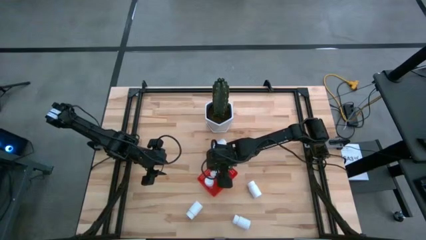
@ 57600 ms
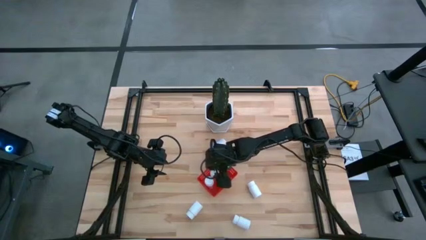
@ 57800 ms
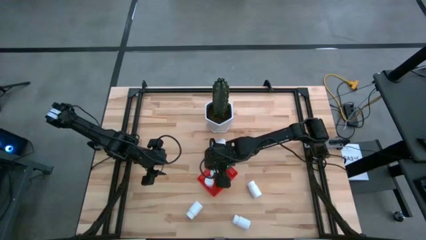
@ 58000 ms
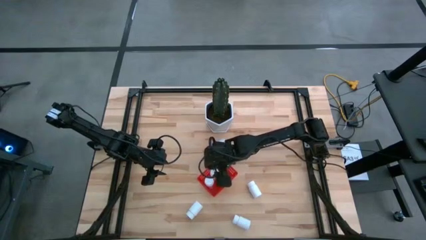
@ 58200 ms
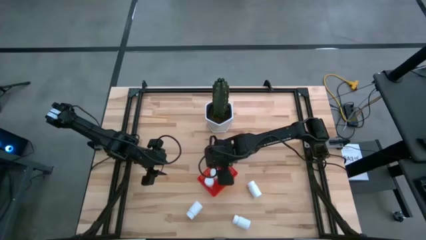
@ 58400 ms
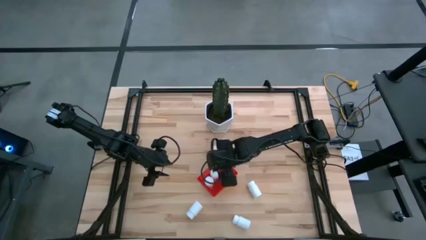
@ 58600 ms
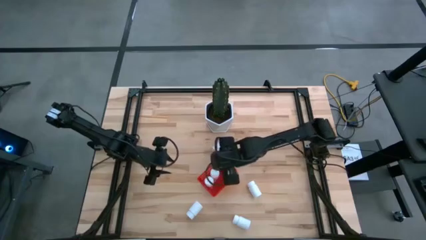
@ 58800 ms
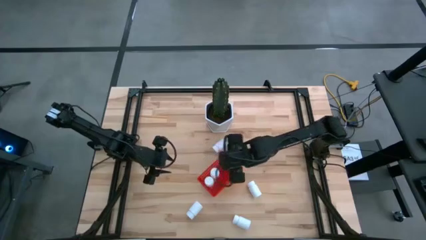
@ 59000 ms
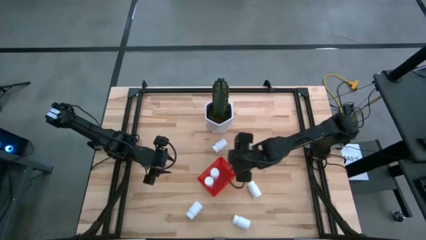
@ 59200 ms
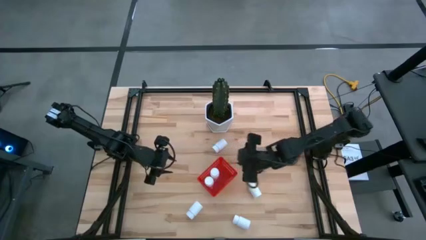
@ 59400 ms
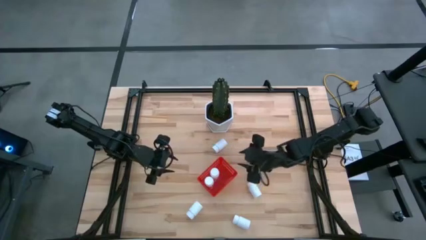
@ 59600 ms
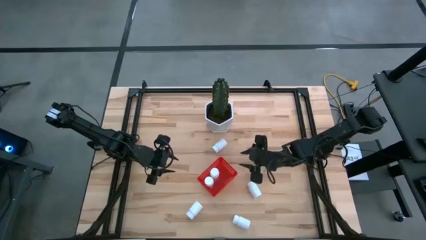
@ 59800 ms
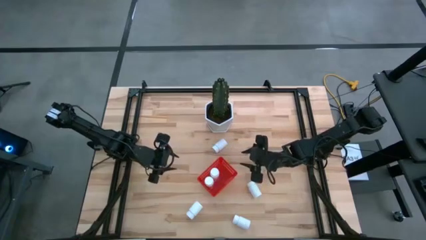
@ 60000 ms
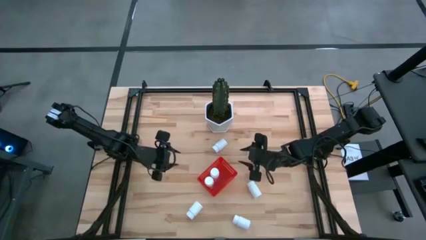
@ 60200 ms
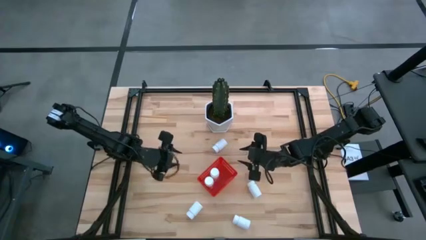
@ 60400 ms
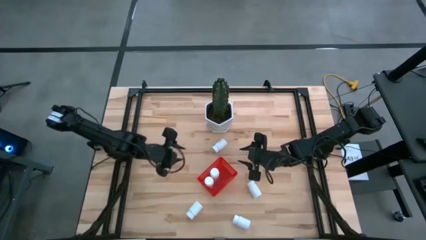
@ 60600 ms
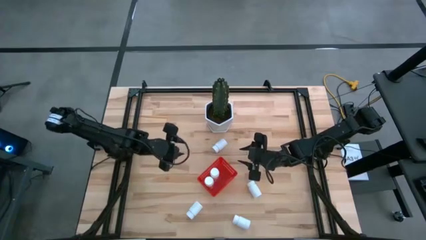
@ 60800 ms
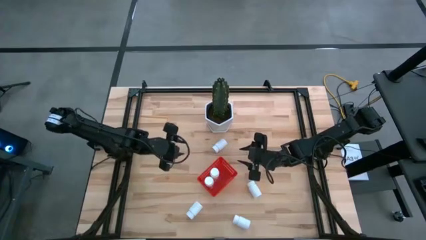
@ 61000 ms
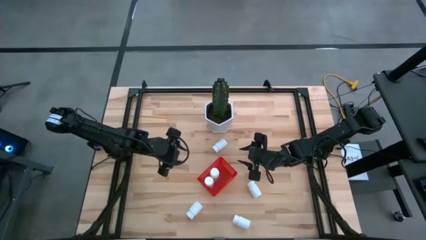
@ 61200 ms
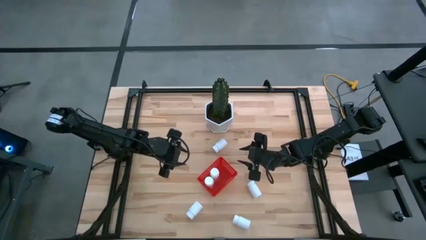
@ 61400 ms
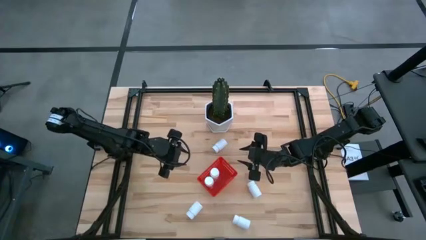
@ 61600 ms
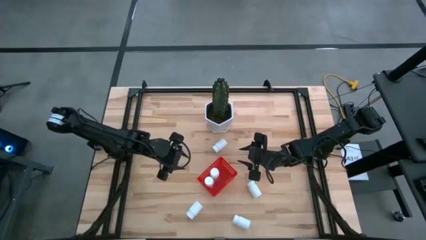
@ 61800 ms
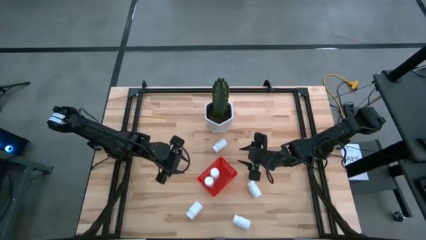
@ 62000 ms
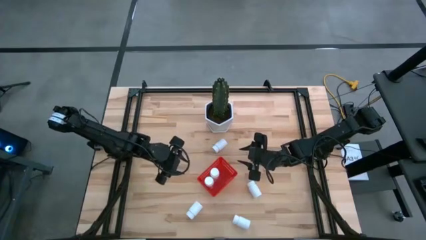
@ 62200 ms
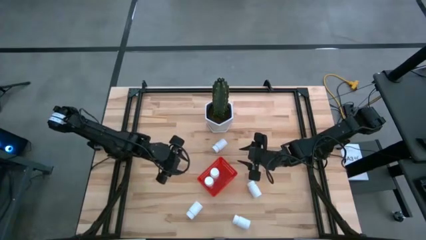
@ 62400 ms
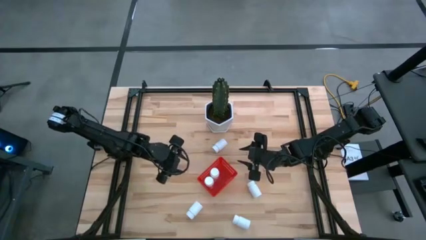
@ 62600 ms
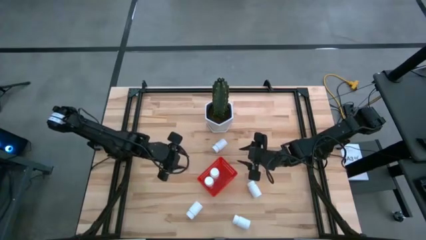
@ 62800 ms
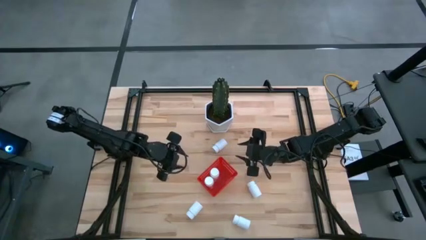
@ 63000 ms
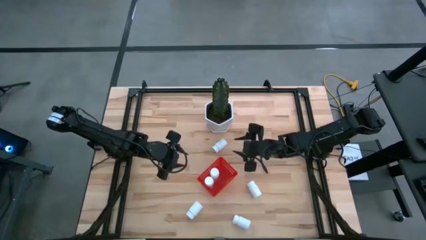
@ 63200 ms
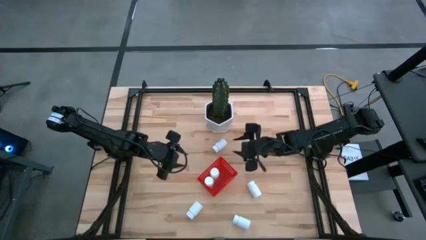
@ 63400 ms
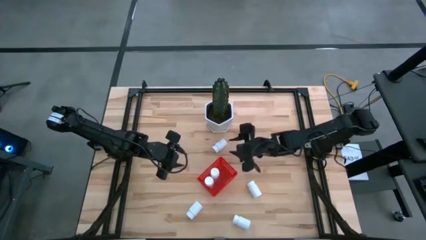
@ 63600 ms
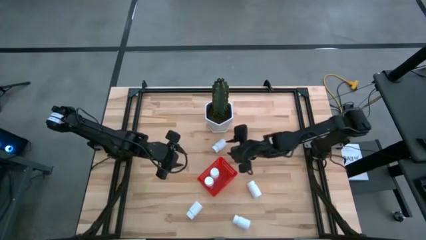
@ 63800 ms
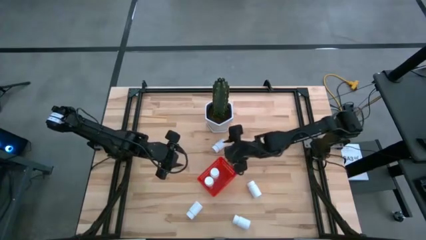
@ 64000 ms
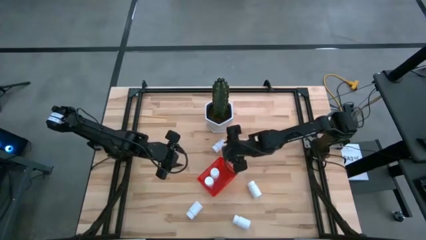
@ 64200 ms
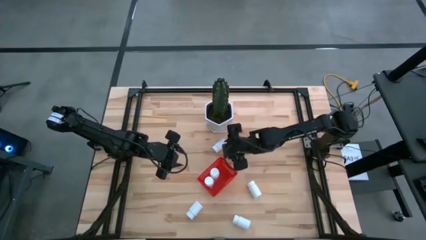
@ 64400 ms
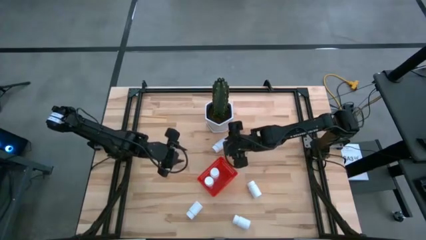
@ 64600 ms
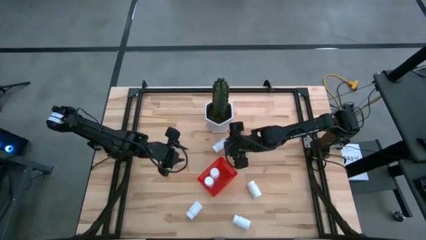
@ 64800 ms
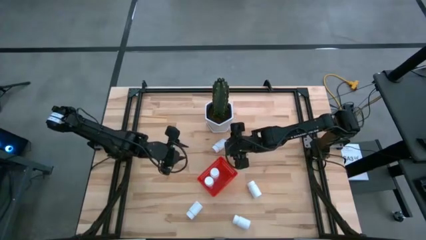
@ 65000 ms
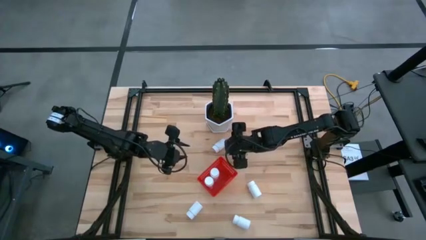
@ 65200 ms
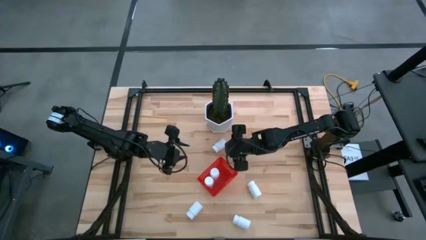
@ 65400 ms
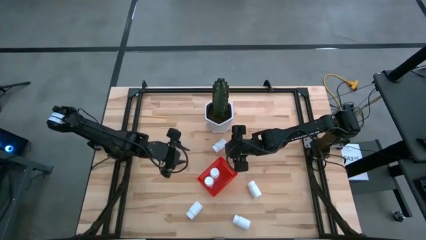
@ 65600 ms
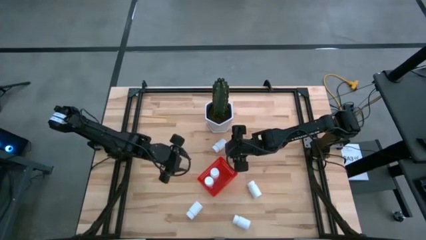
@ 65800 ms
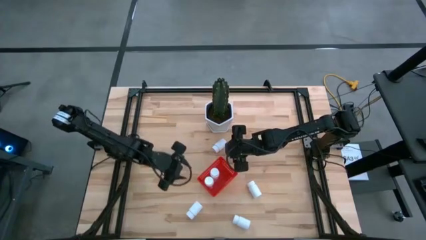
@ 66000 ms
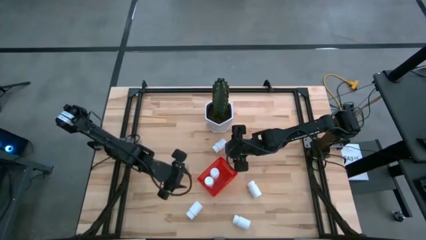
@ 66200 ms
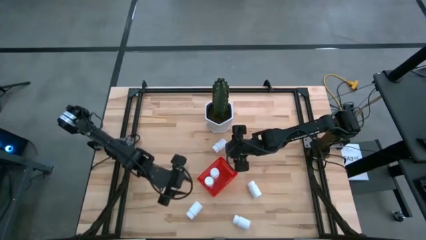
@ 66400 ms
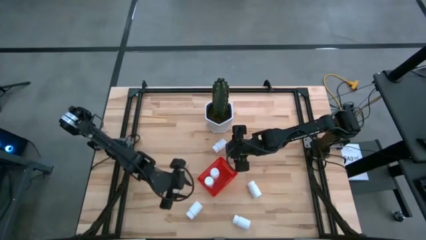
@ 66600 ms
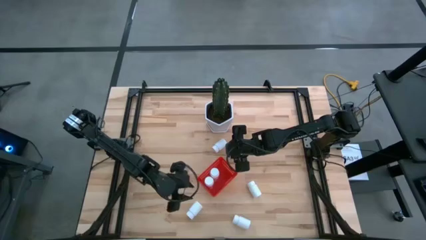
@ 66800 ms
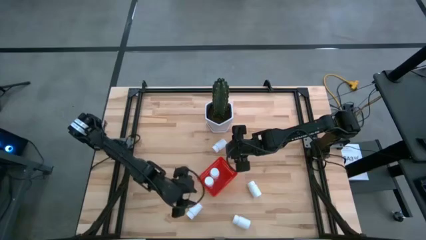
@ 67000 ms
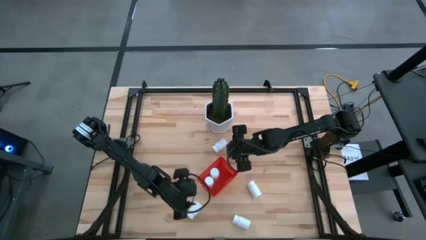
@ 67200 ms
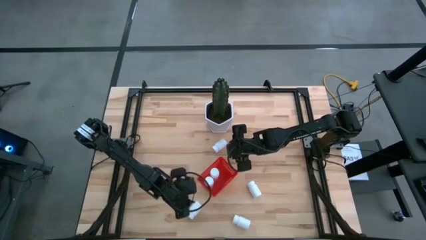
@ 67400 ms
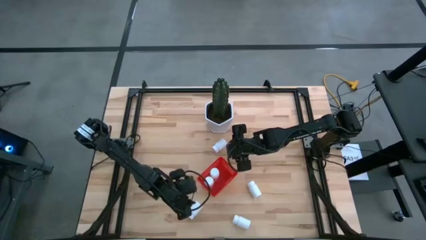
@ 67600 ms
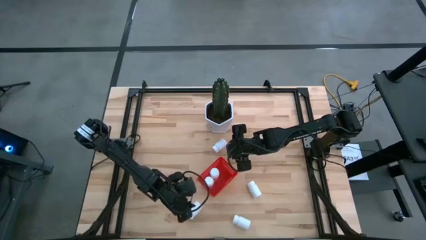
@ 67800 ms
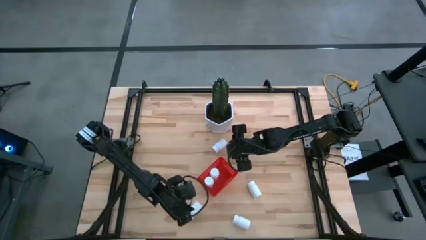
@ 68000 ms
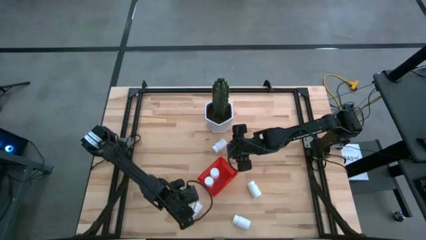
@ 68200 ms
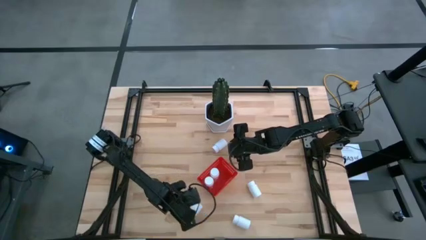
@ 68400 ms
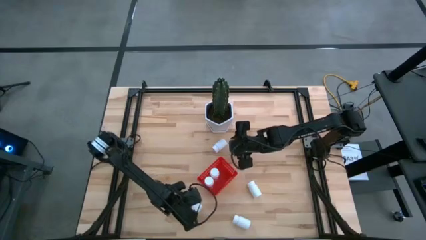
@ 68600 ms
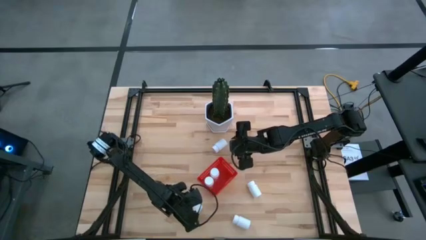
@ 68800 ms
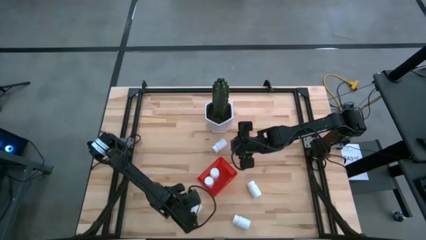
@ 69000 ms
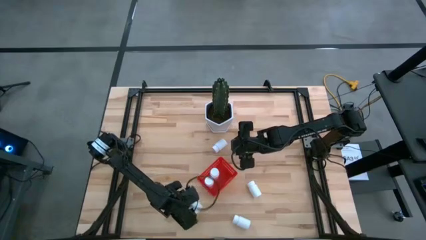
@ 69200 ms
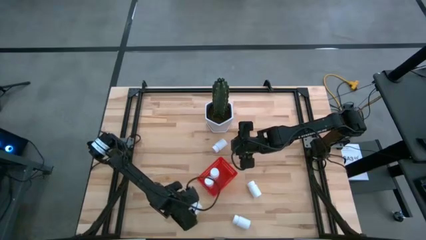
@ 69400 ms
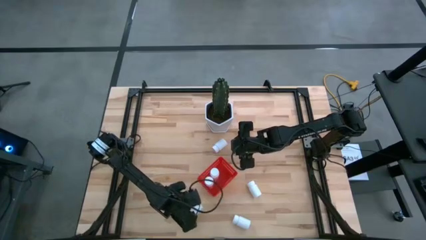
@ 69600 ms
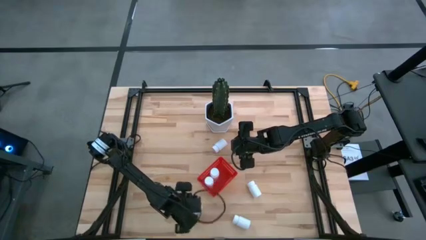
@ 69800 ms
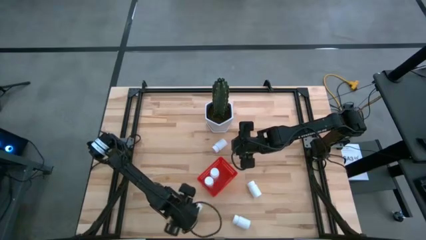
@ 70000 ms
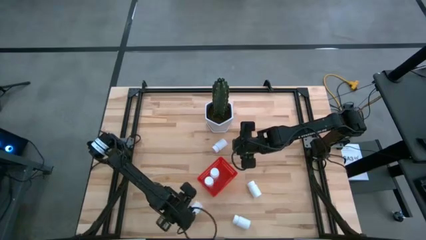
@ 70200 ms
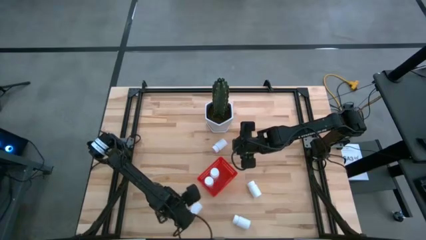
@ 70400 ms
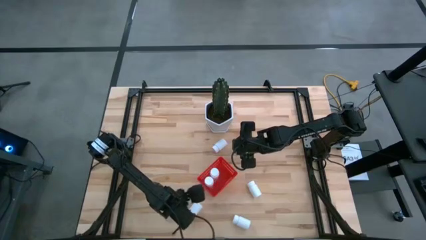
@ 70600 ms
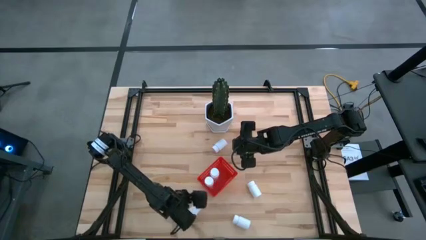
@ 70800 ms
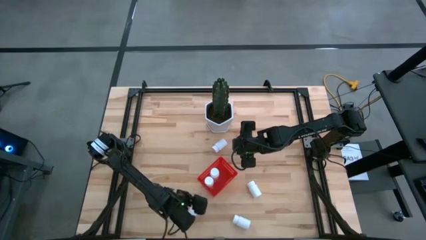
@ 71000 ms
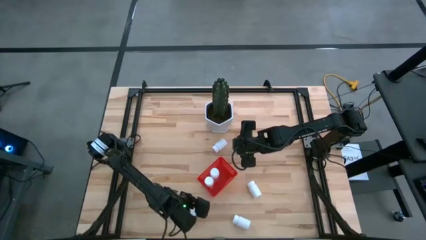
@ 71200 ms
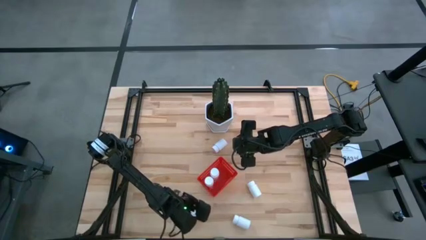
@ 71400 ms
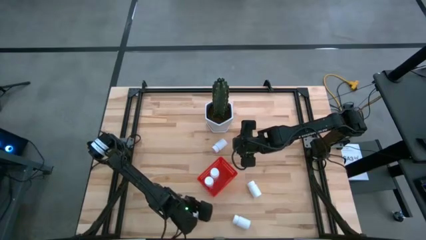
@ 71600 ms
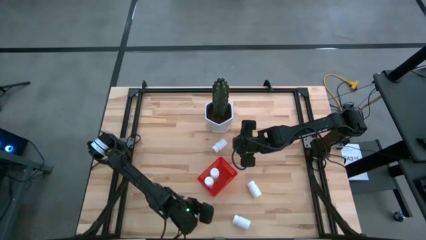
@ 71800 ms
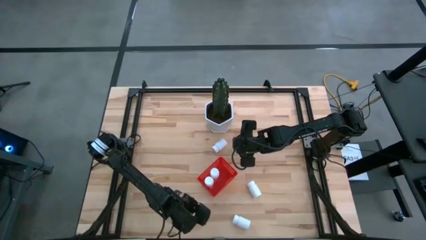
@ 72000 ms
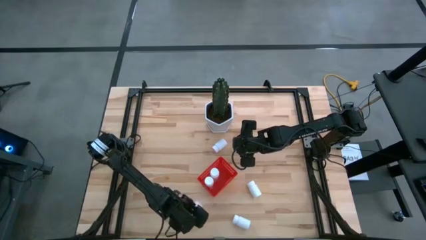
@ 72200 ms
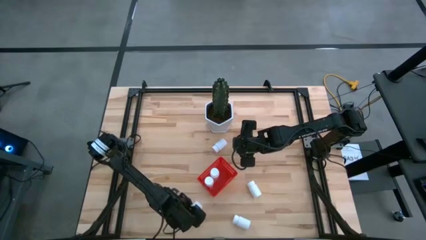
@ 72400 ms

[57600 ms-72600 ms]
Task: Pick and place pill bottles into a basket
Put the white pill bottle into the red bin
